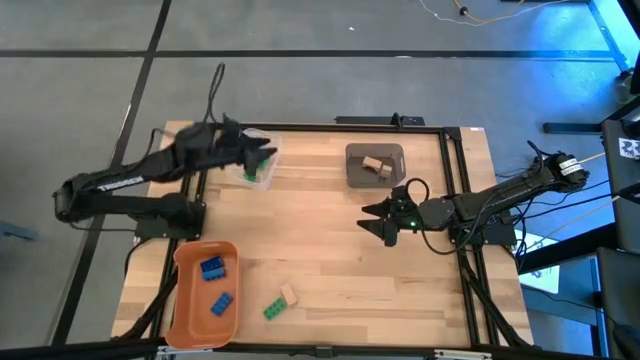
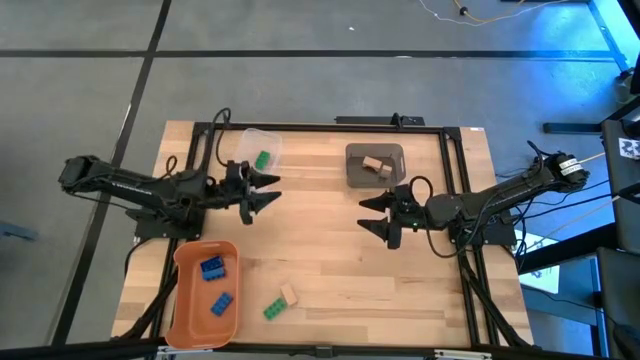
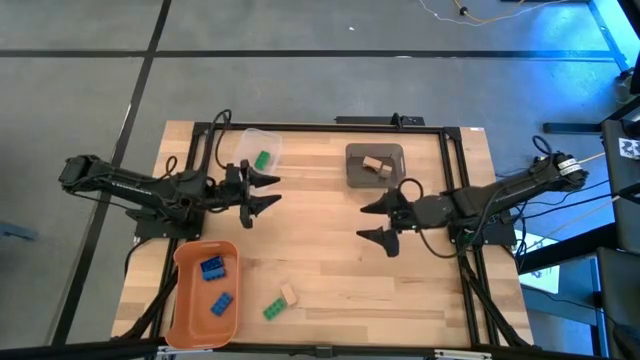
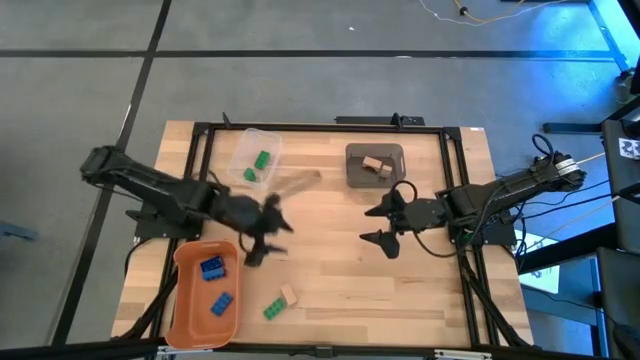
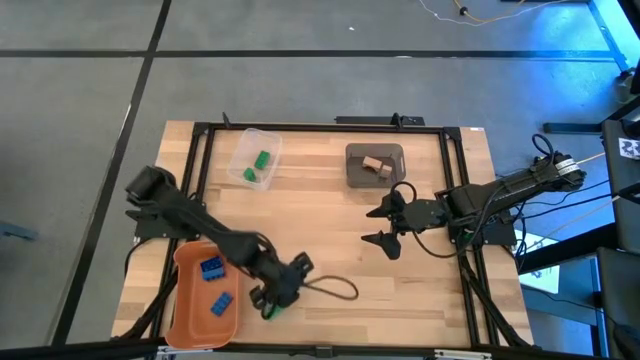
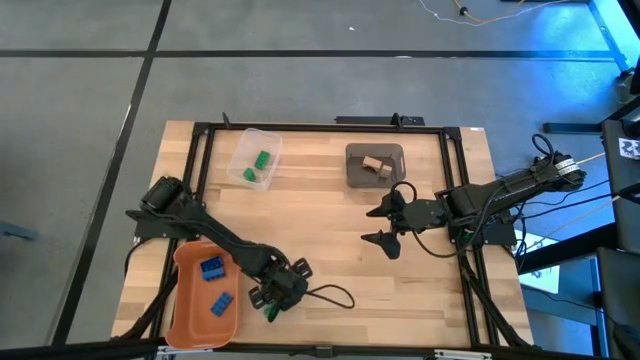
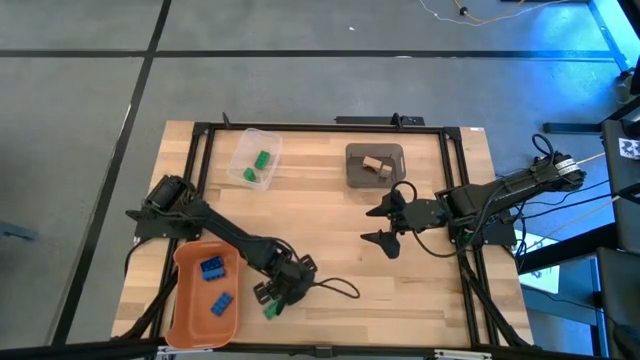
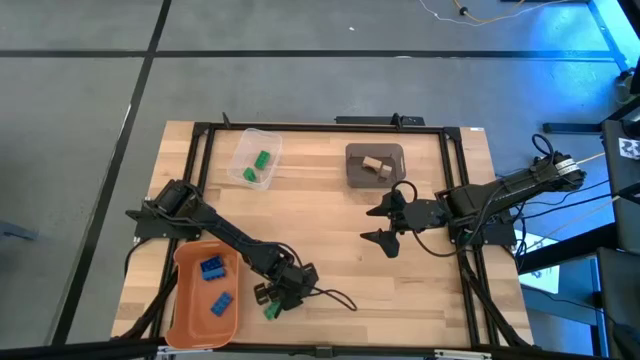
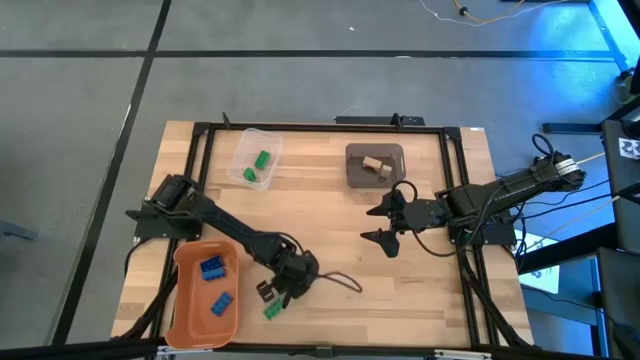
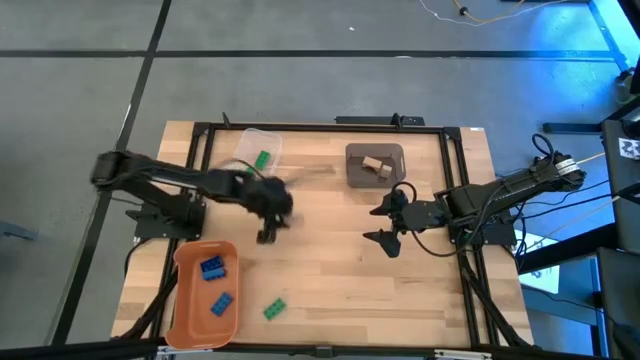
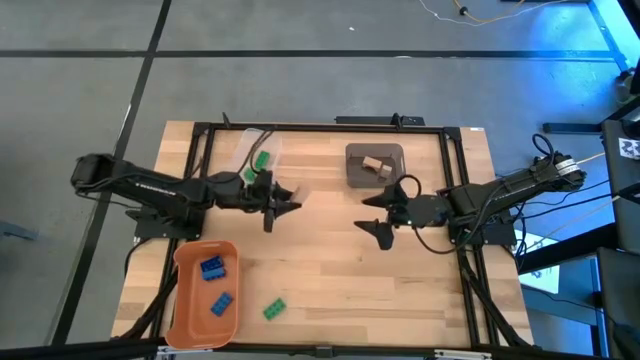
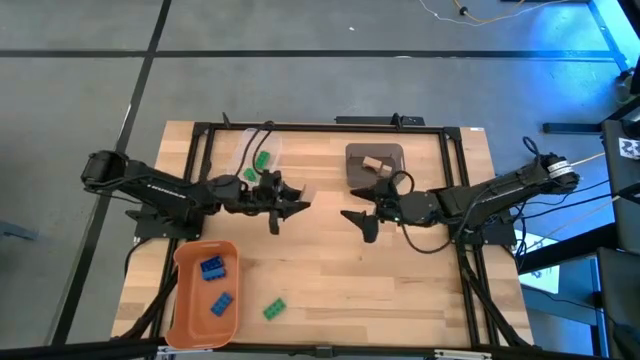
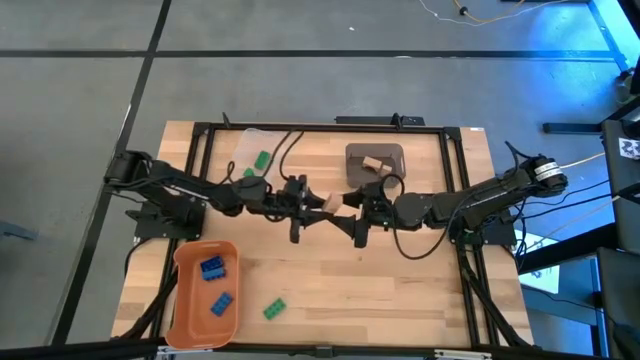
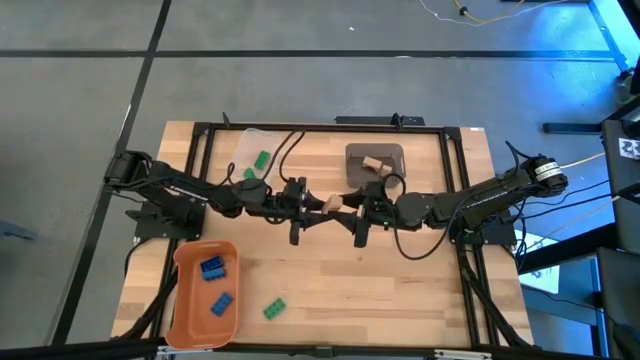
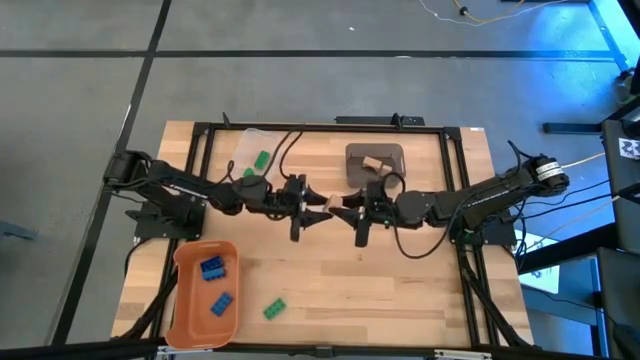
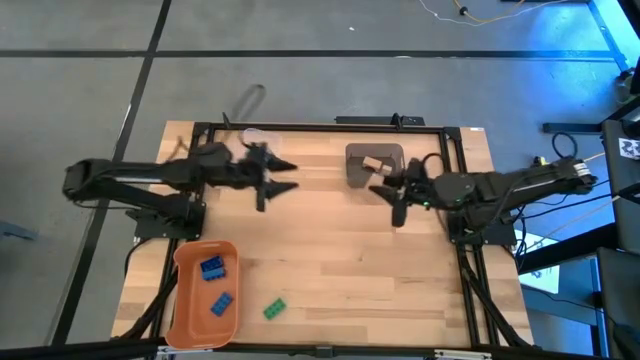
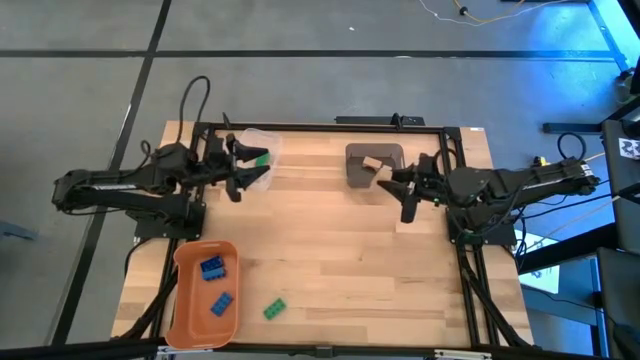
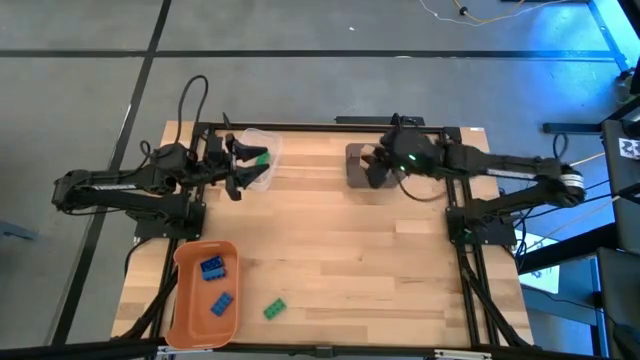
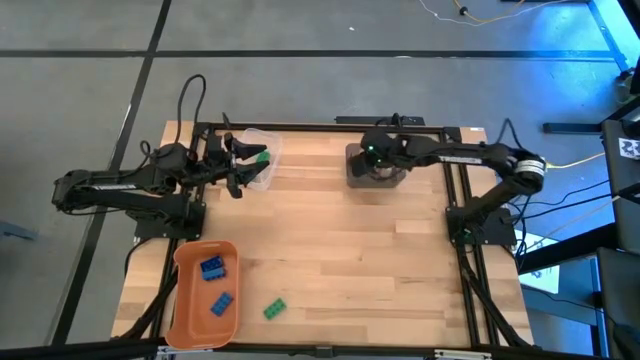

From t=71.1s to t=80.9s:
Task: Sort & place blocks by color
Put the brown block into the black bin

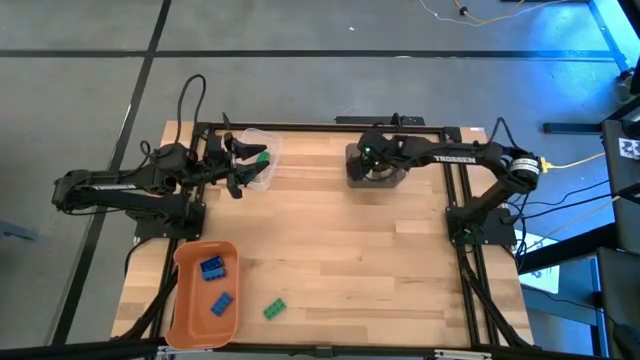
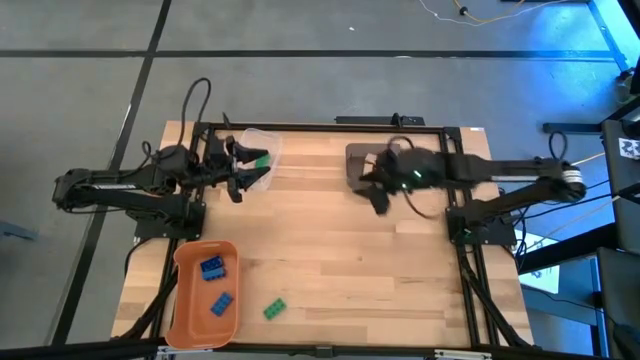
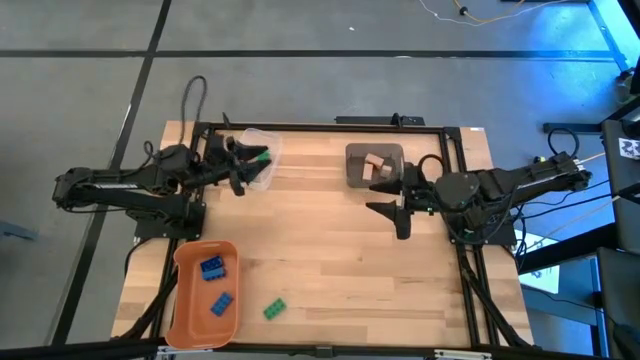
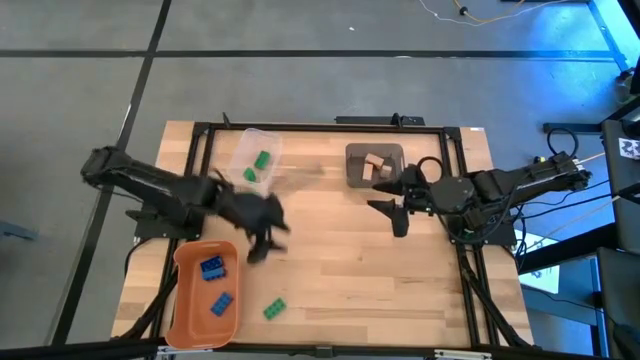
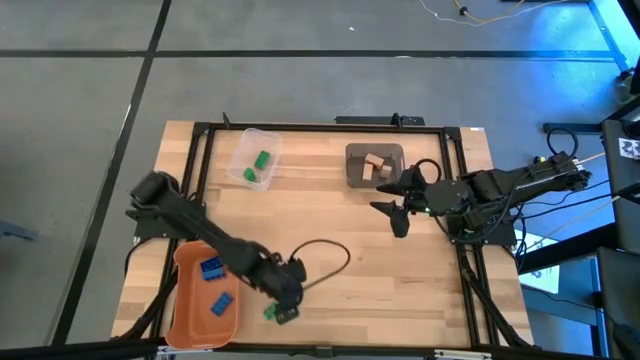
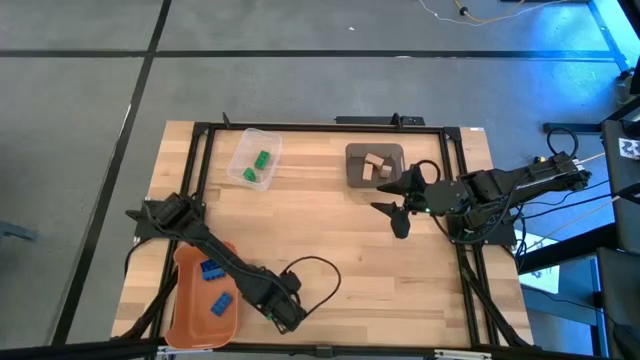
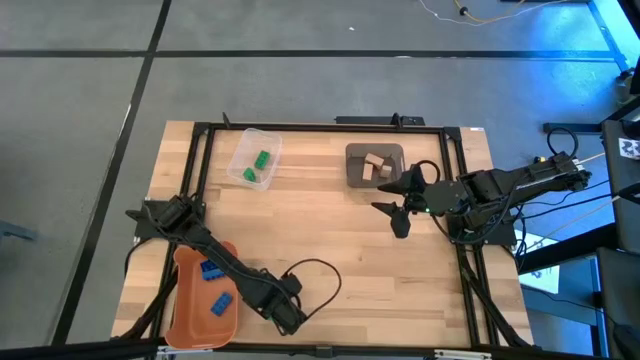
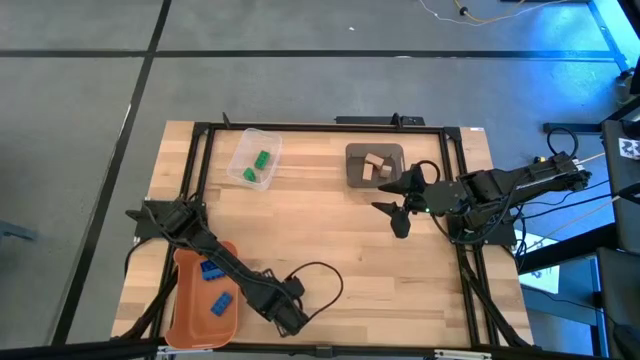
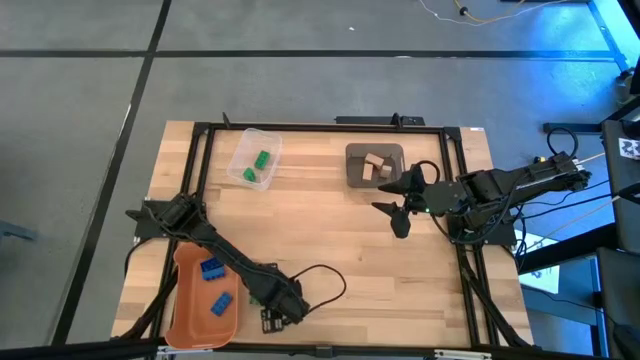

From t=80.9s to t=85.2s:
Put the green game piece into the transparent bin

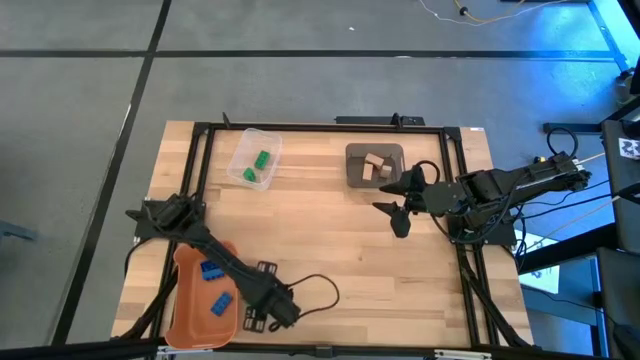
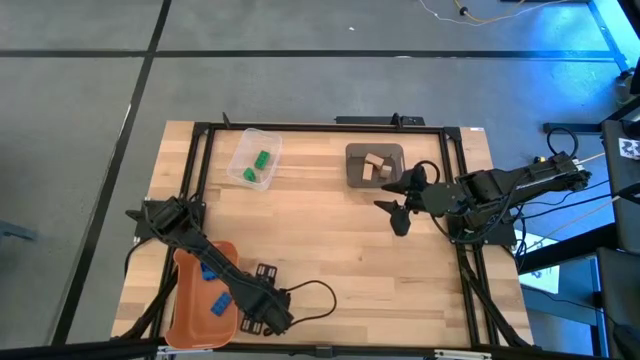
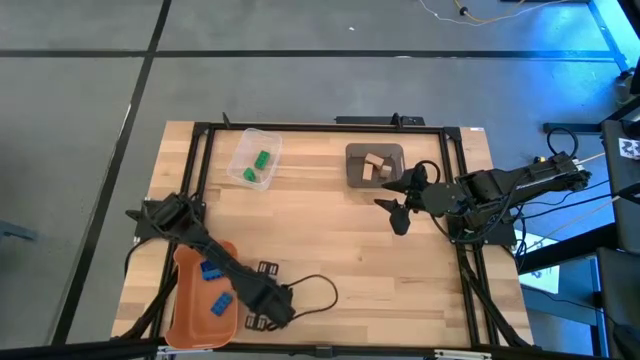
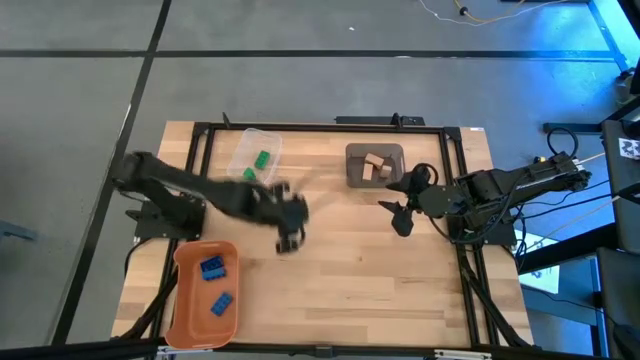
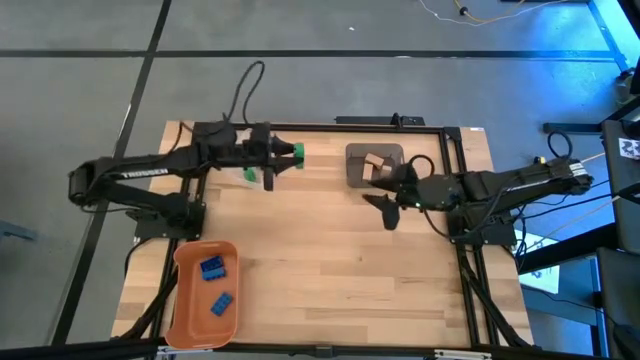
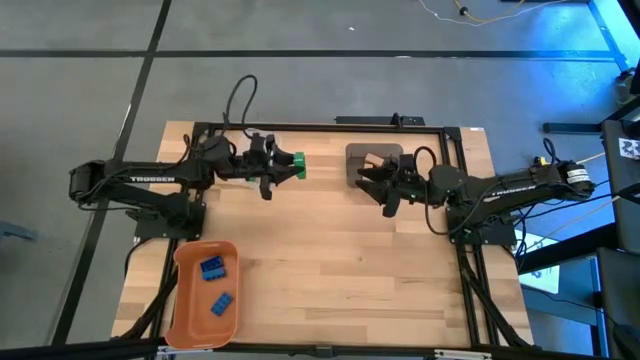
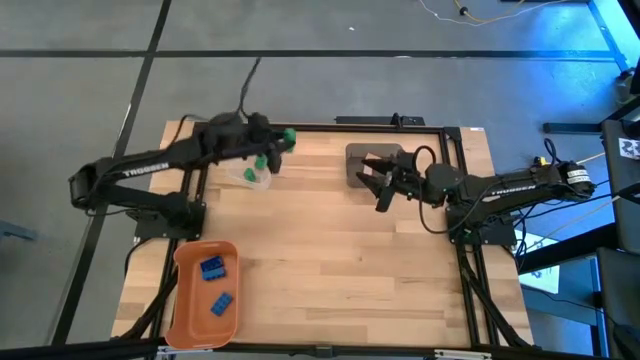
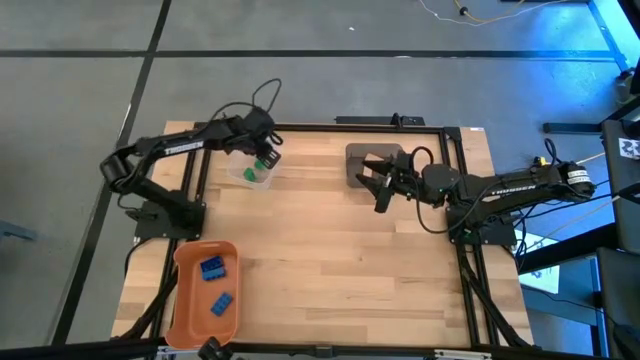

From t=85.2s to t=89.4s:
Put the green game piece into the transparent bin

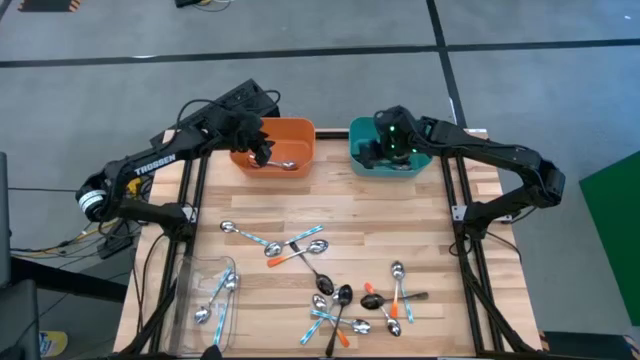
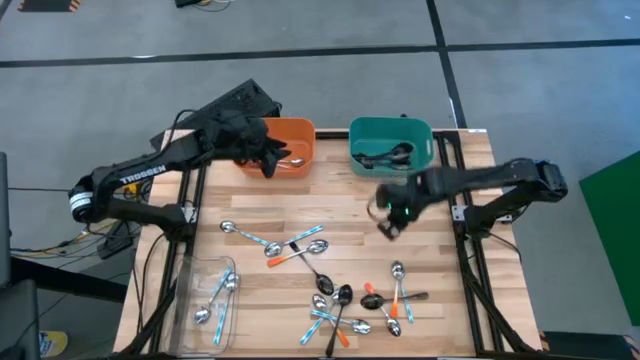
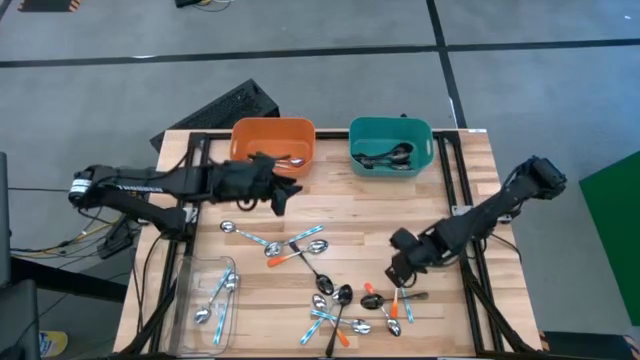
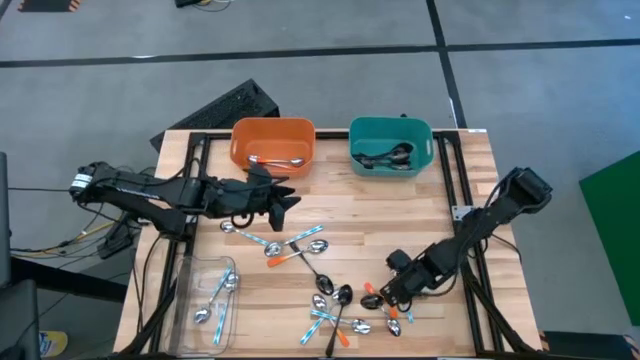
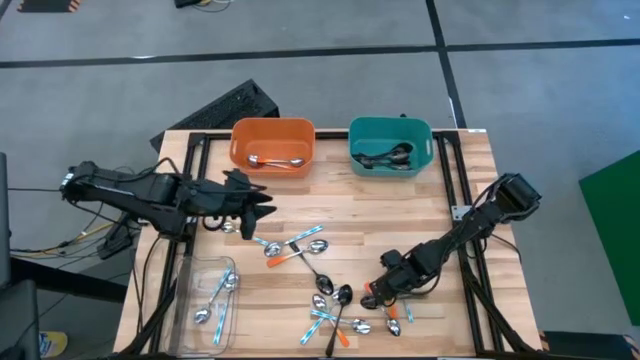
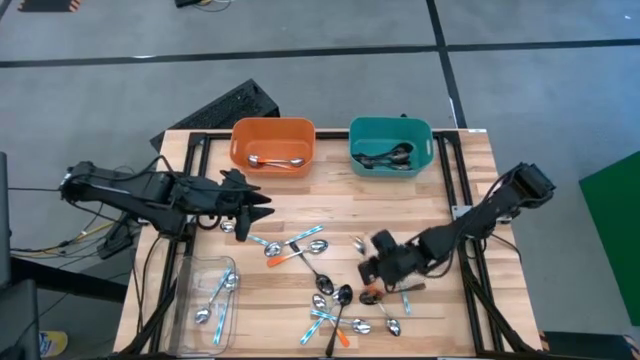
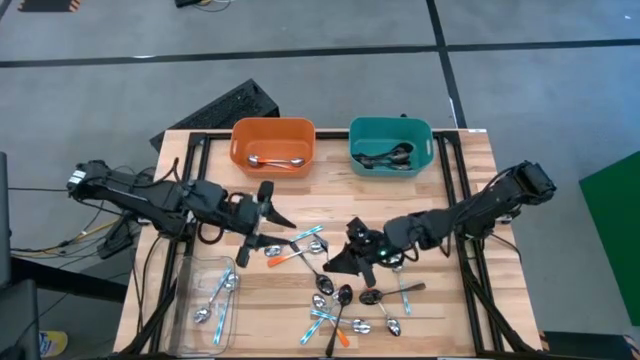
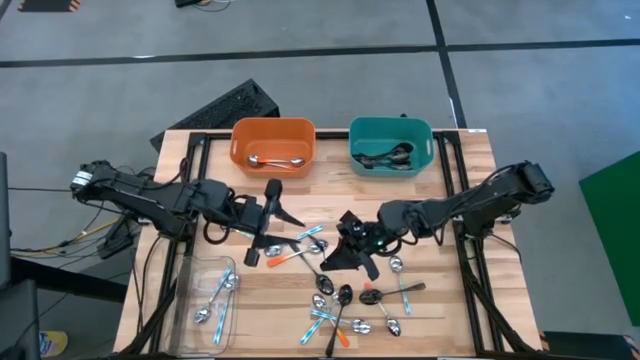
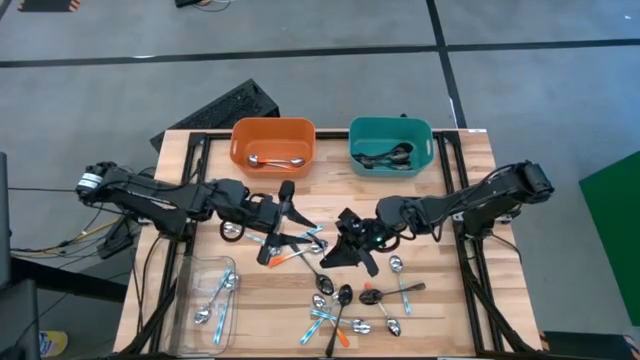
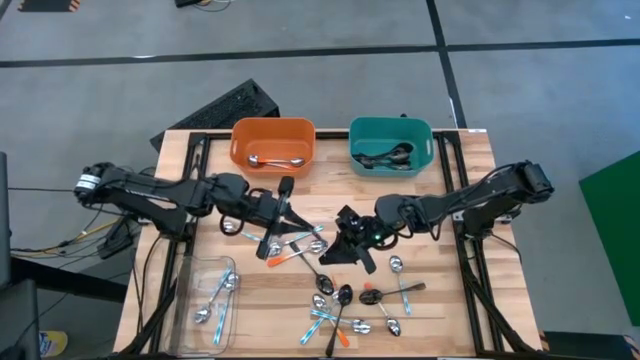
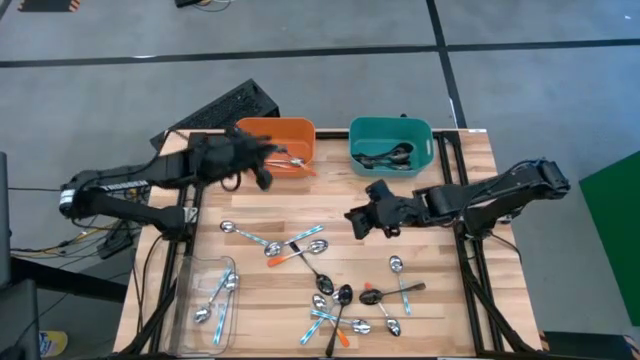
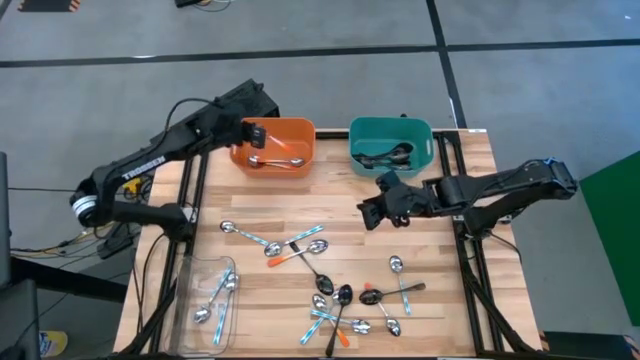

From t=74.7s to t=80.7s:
Task: Sort silverware by color (type)
Put the orange spoon into the orange bin
